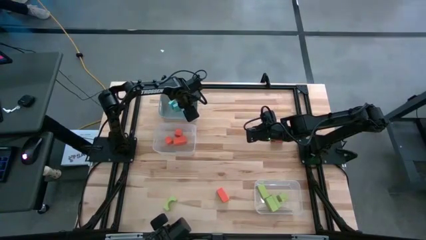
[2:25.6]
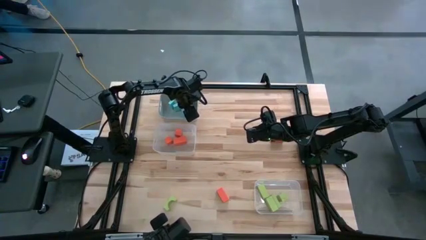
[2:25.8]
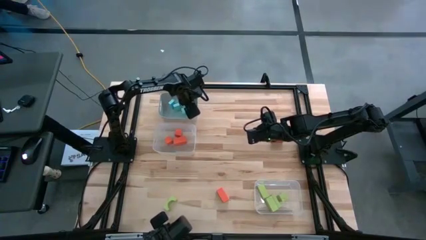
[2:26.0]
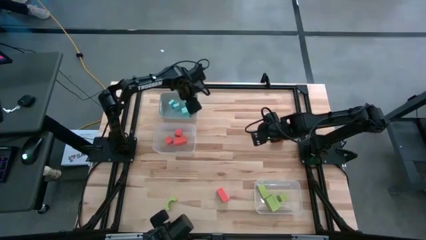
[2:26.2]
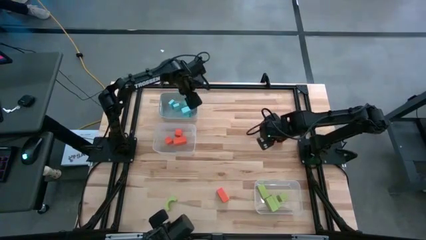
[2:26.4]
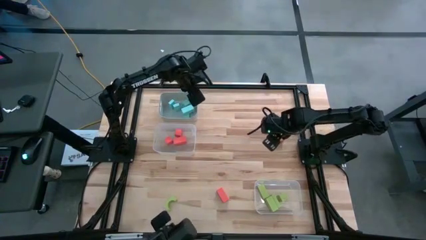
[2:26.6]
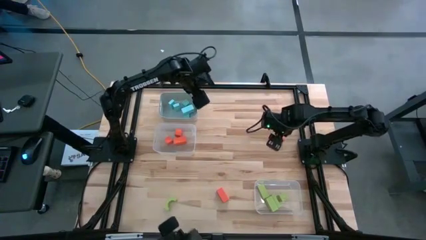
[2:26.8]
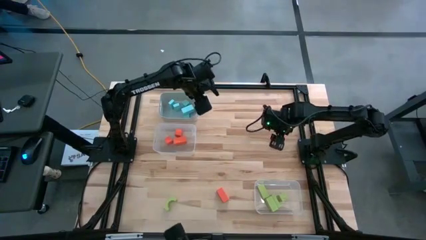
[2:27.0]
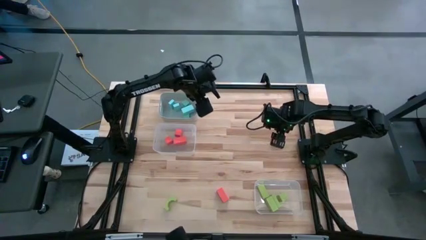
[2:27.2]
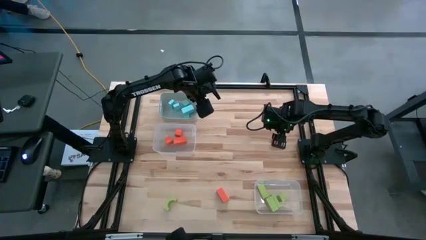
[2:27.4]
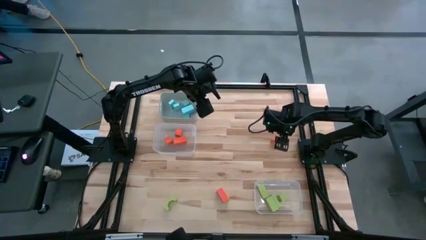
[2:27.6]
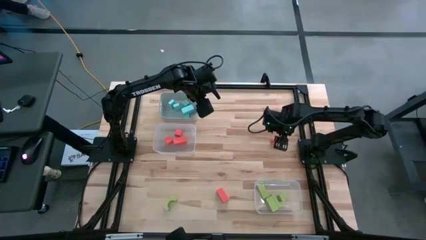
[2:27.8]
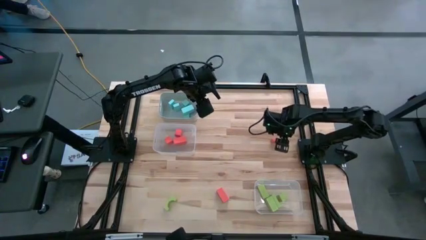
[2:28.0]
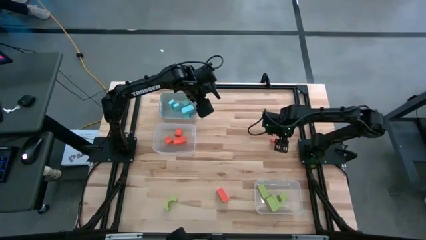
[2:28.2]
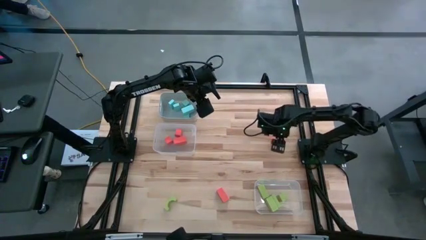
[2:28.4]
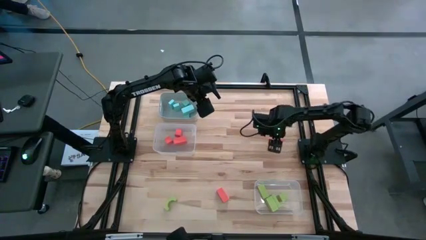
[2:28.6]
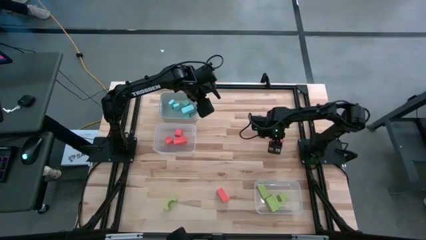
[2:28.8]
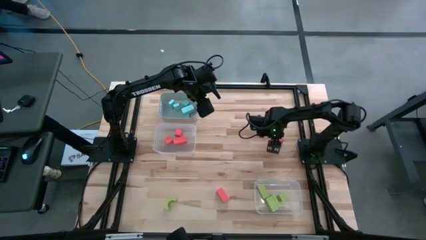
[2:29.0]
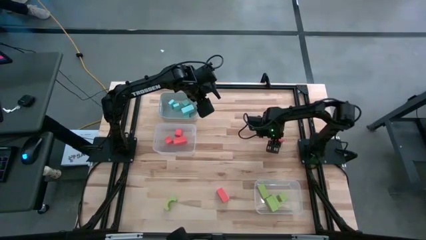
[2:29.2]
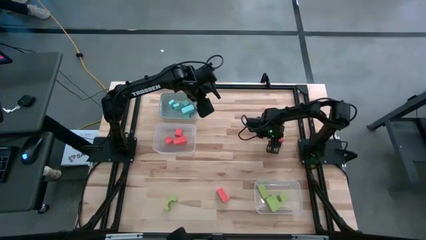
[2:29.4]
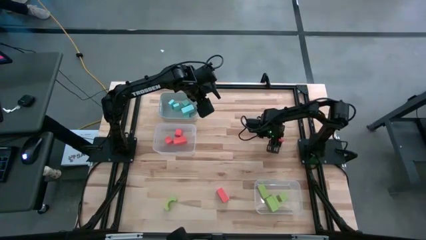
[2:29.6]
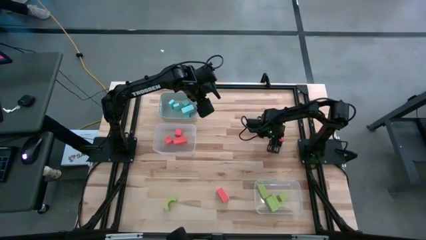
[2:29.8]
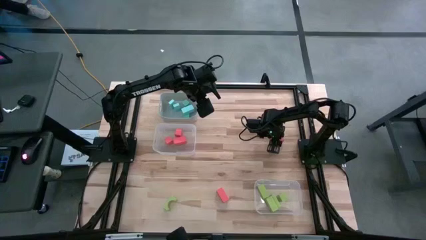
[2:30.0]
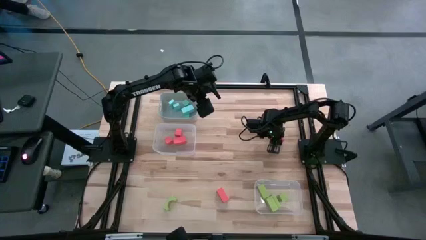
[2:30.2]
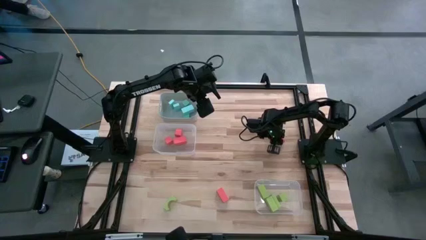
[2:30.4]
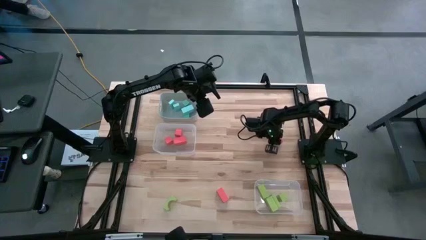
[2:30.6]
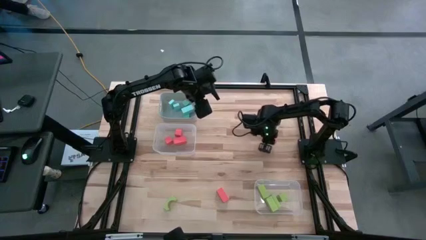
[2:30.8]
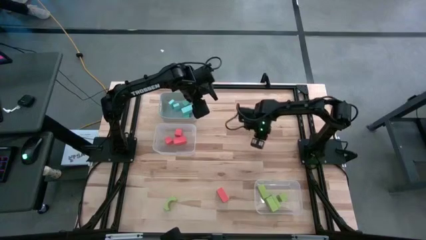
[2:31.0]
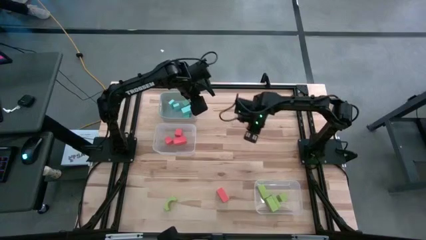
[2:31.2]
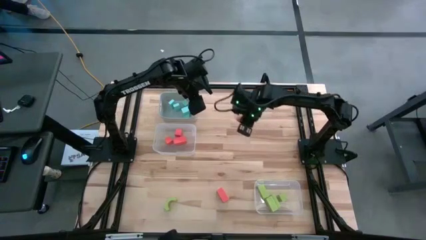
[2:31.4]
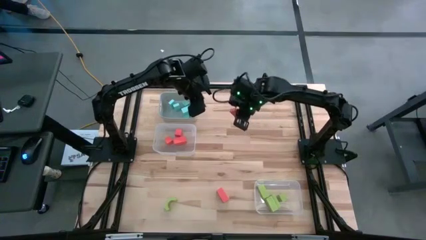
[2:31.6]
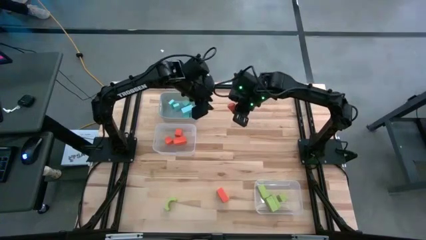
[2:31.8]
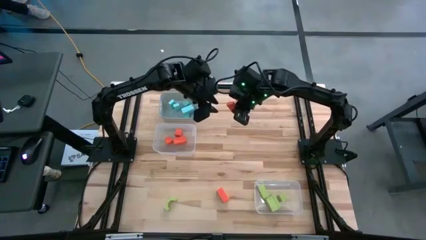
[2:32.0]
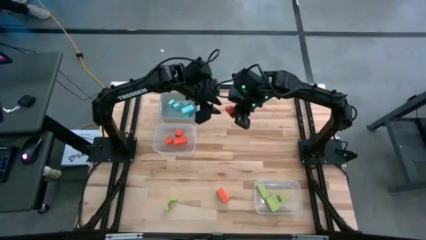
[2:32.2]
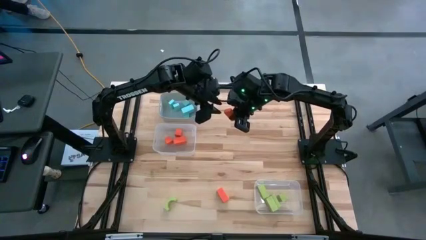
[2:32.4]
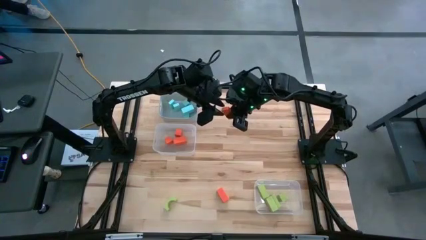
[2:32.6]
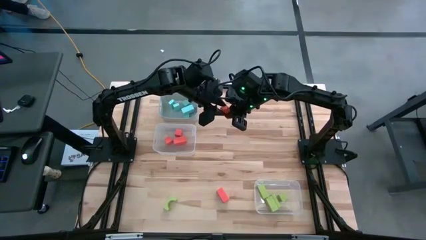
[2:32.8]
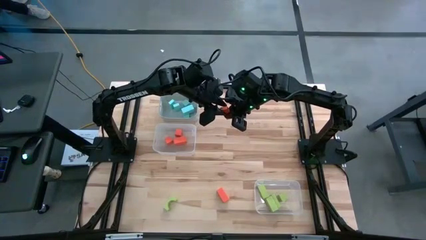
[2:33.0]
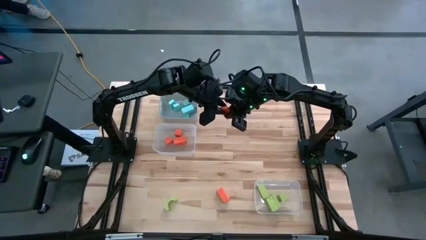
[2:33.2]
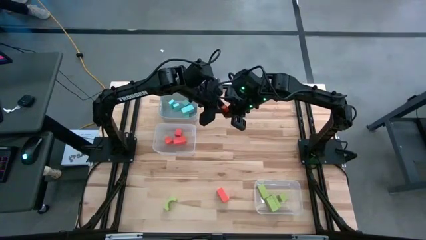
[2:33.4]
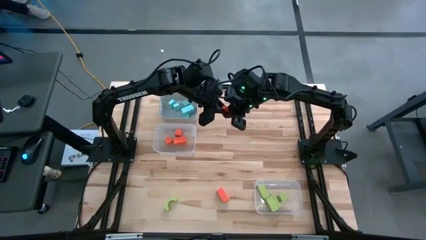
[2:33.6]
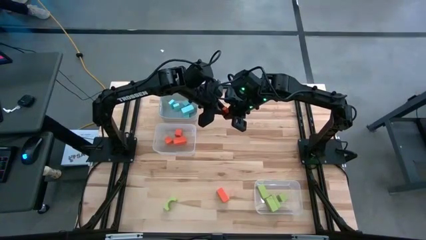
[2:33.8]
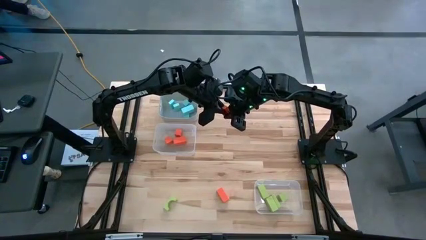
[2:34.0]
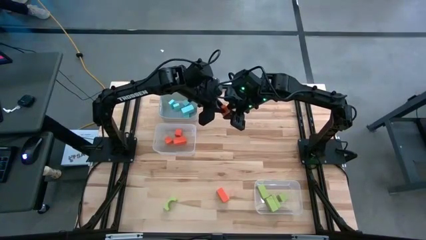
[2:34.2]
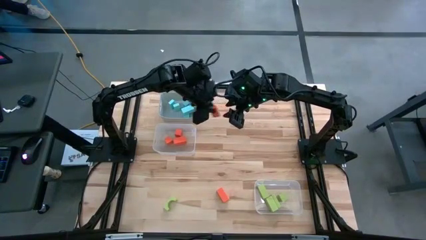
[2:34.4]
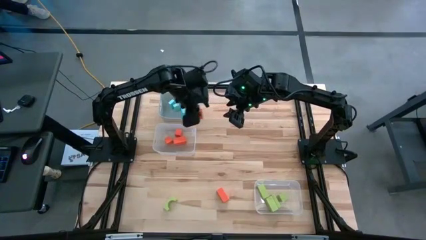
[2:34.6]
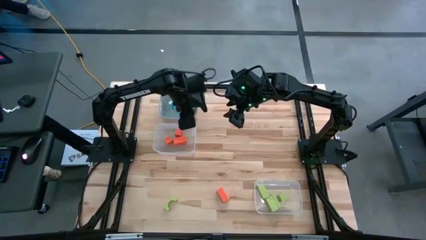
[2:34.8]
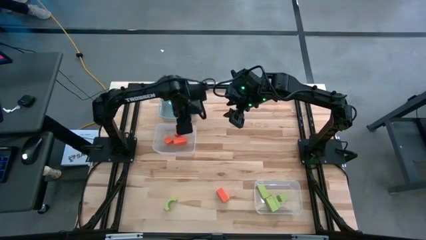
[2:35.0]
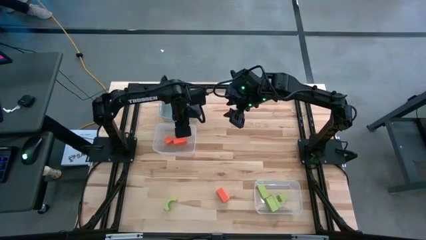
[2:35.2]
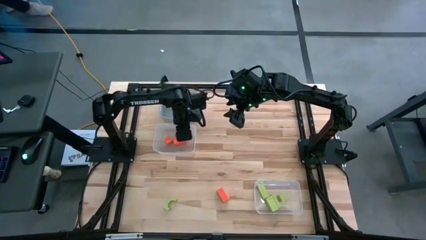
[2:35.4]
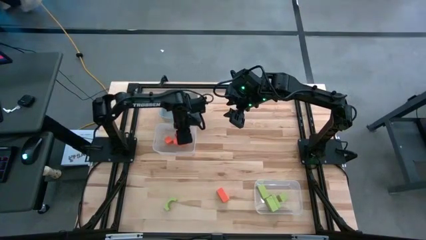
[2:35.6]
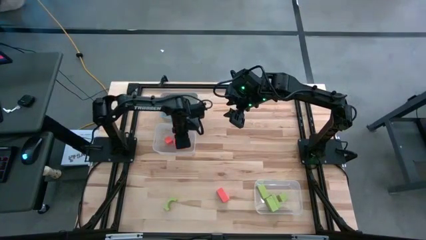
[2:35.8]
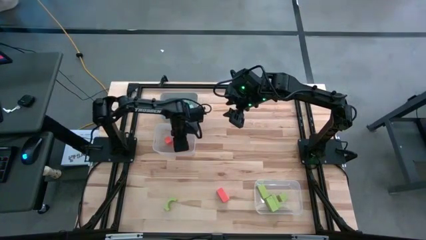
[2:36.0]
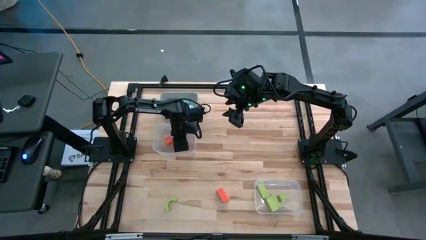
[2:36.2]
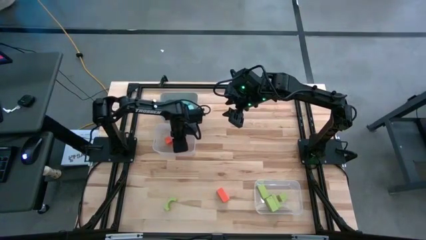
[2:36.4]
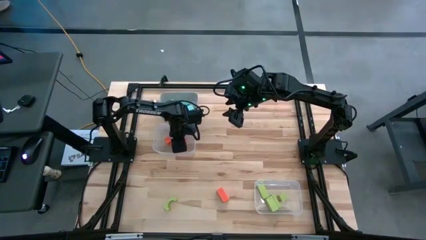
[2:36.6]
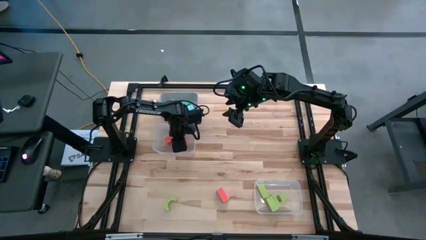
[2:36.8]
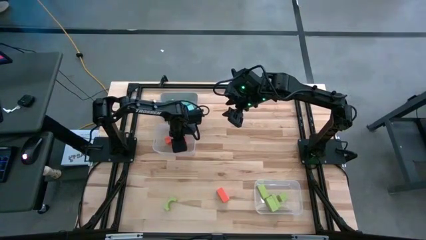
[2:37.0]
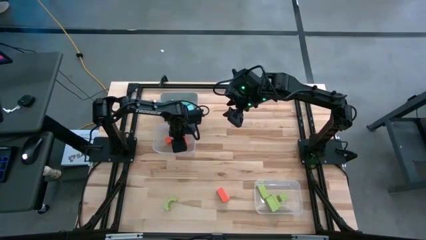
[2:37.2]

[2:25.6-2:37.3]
Task: Sort & place blocks by color
Put the orange block into the top transparent bin

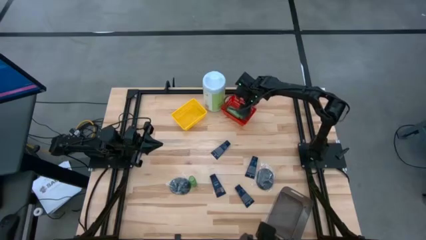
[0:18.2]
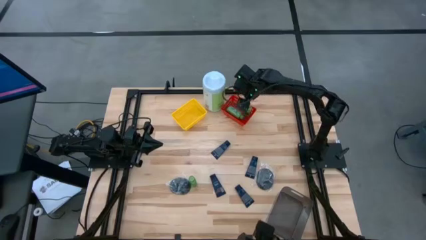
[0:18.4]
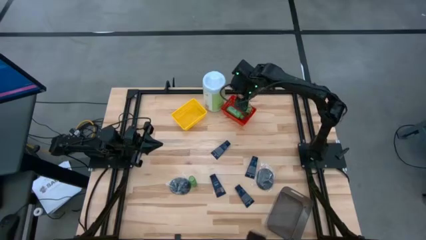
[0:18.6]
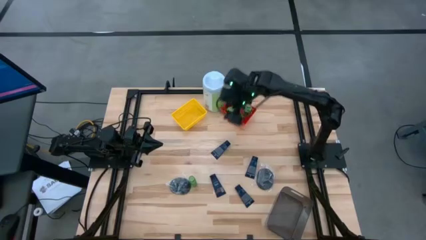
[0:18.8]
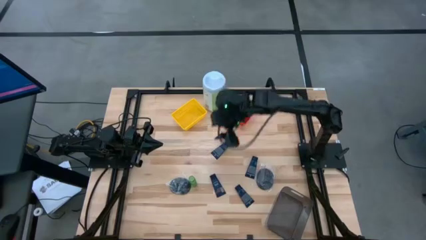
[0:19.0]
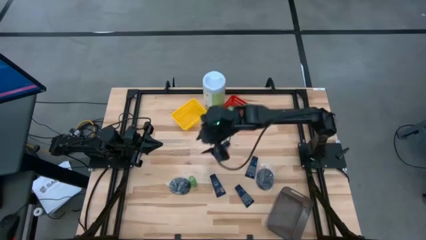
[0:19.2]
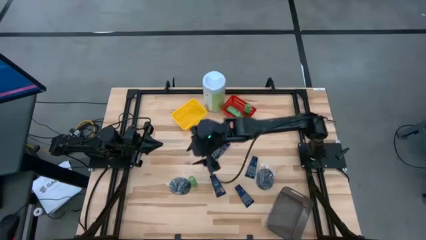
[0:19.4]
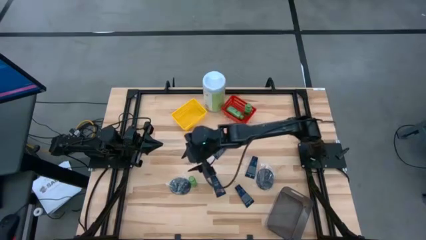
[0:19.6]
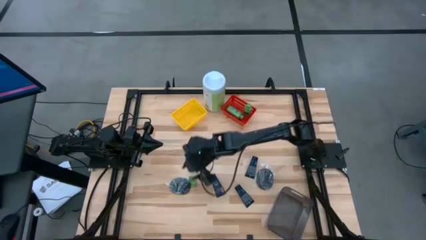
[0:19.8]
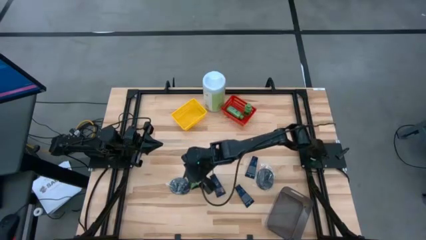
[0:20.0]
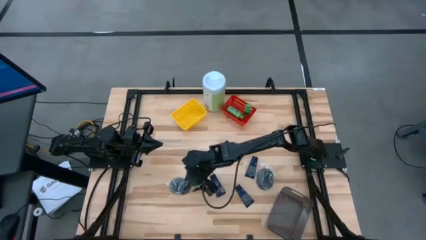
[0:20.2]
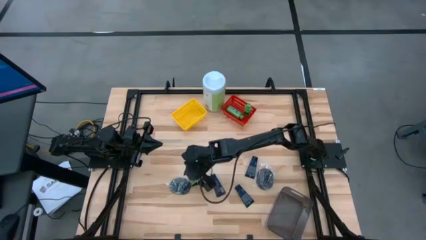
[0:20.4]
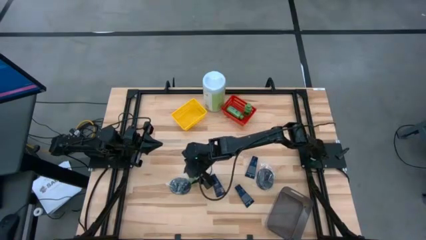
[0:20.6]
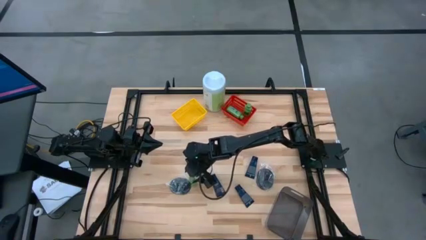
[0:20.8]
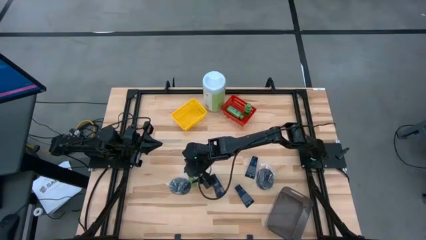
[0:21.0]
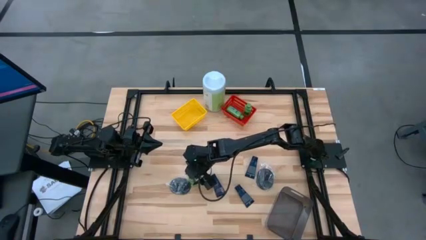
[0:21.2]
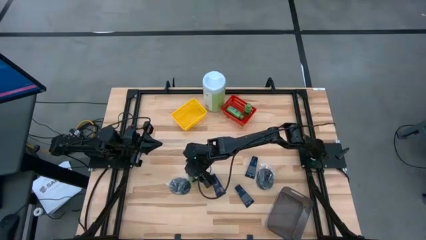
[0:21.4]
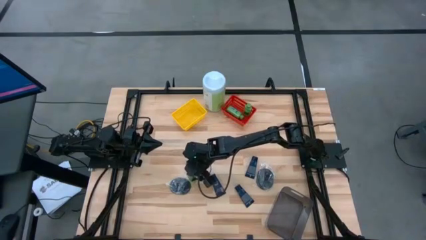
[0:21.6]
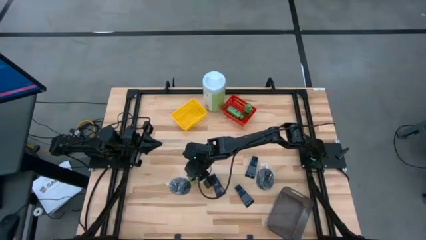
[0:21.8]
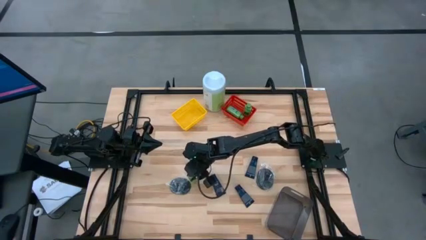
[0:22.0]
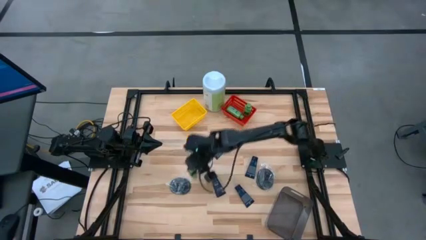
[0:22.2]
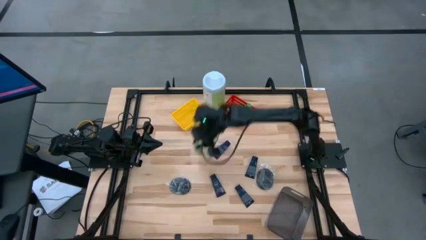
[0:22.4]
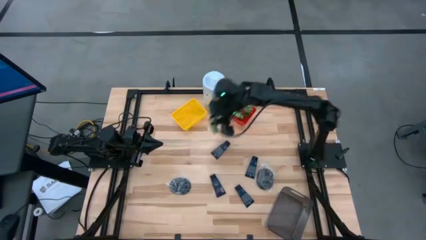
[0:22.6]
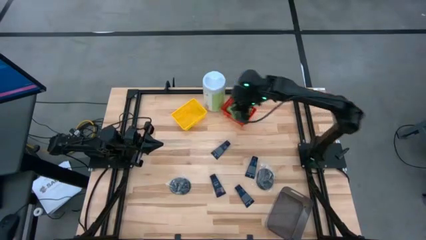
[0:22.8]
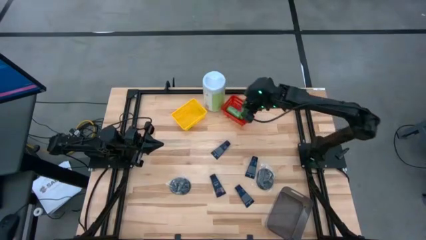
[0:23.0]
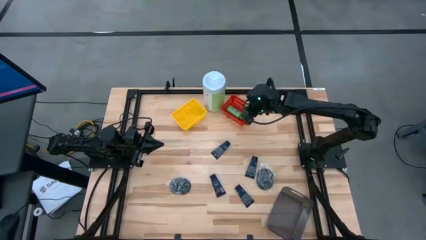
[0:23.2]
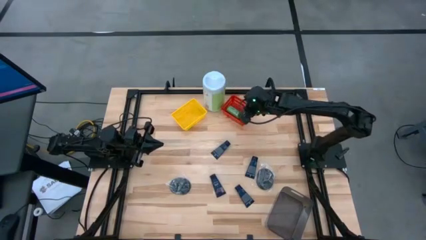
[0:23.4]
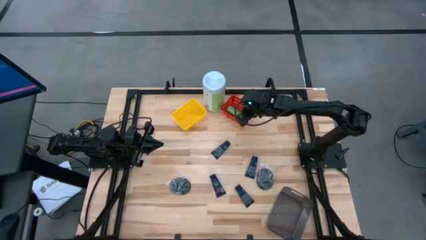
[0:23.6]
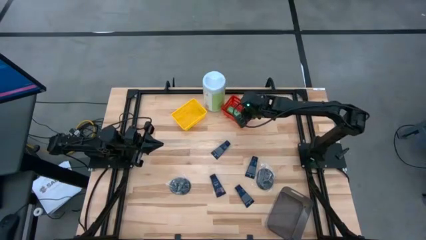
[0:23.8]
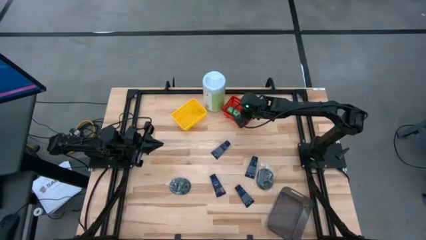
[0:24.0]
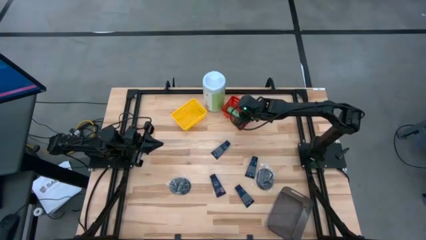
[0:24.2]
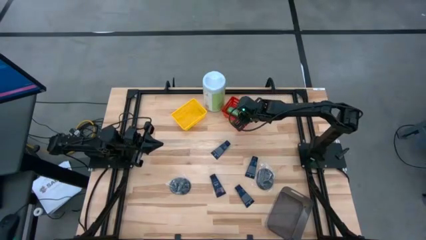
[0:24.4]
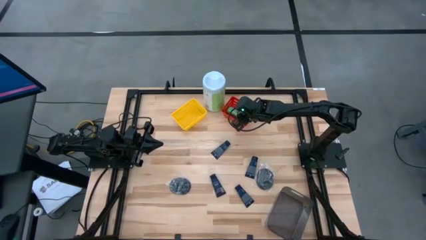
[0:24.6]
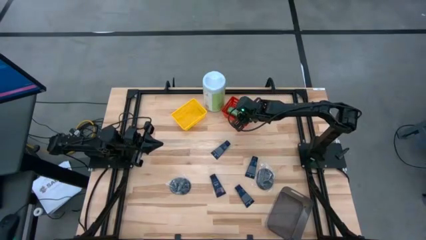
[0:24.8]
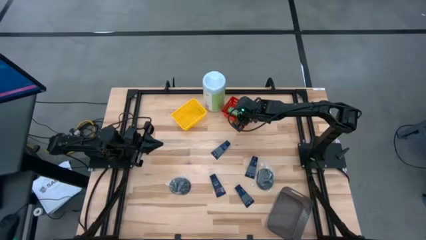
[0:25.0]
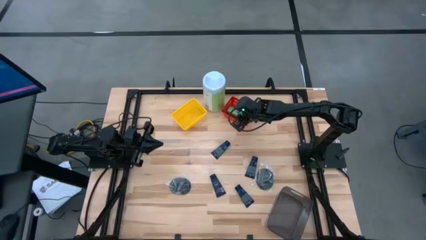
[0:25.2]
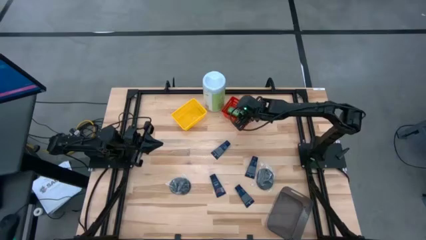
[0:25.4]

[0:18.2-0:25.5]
Task: Pick & Place Travel size toiletries
Put the green shampoo bottle in the red bin
